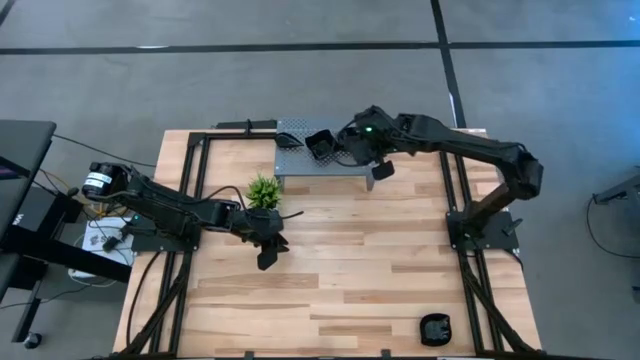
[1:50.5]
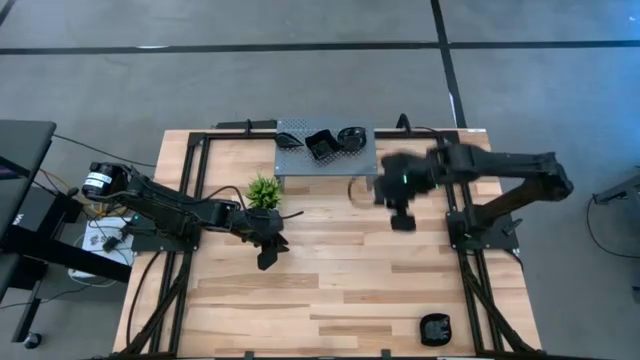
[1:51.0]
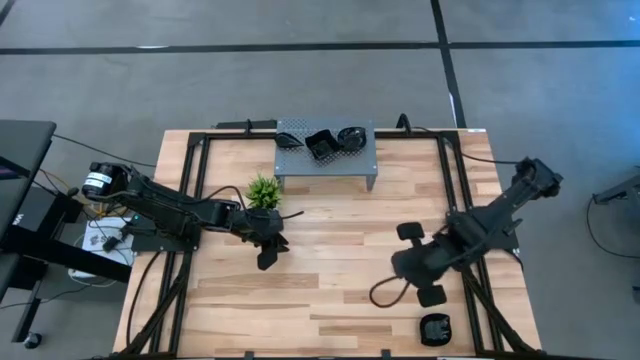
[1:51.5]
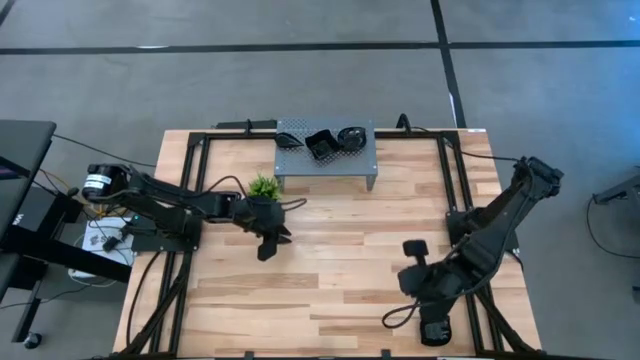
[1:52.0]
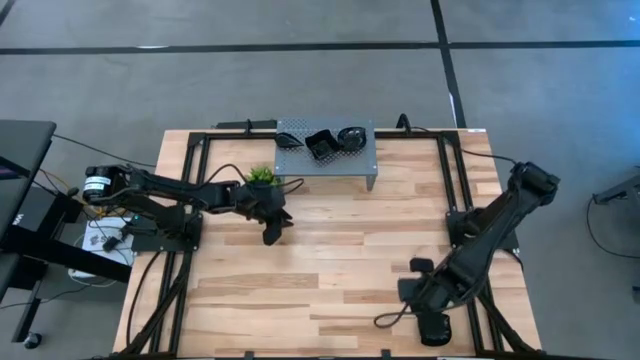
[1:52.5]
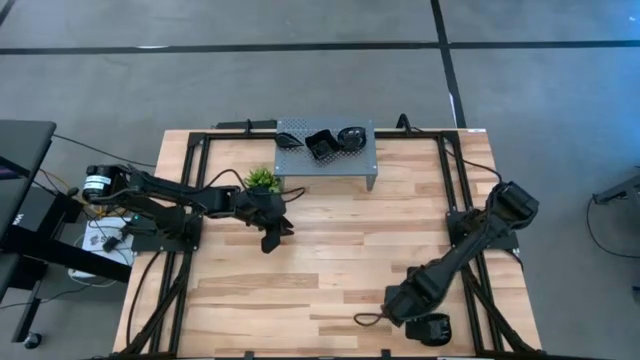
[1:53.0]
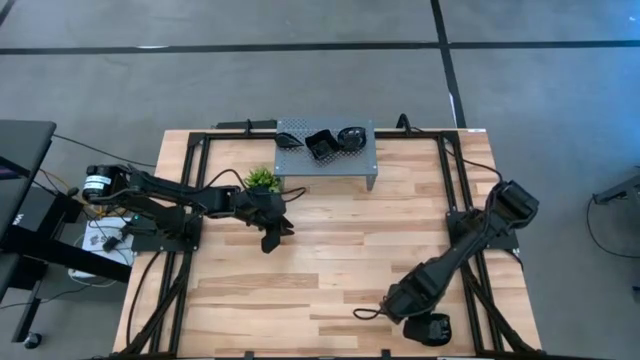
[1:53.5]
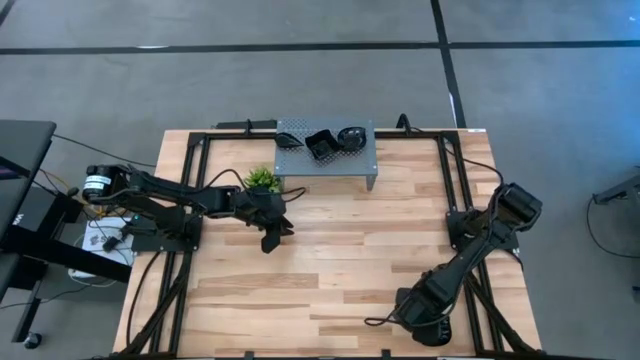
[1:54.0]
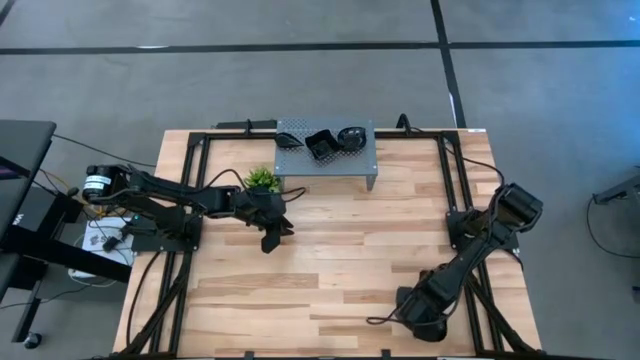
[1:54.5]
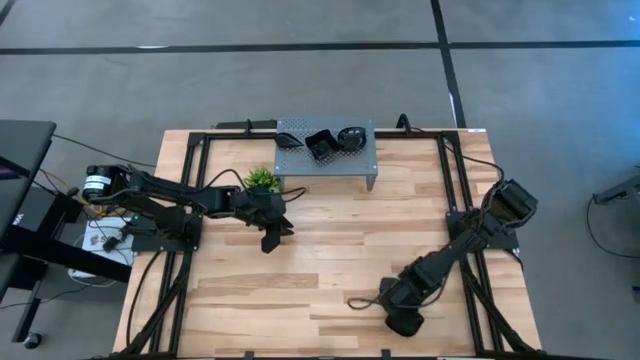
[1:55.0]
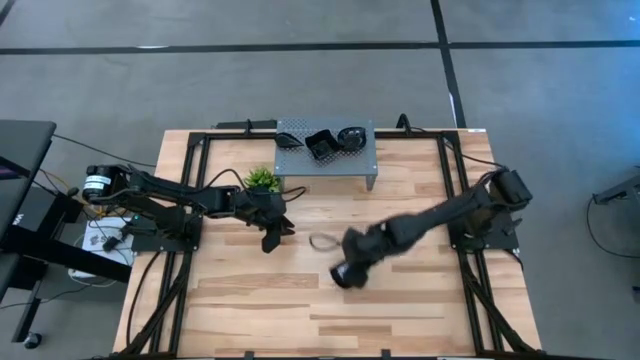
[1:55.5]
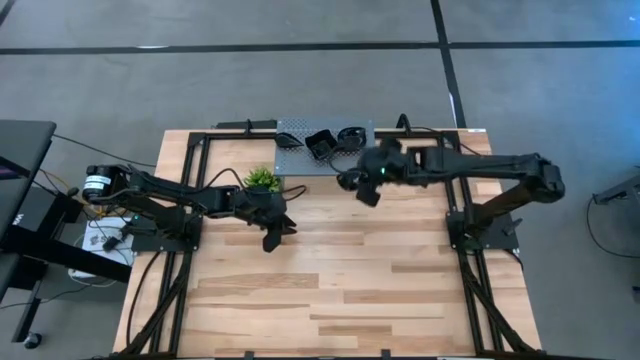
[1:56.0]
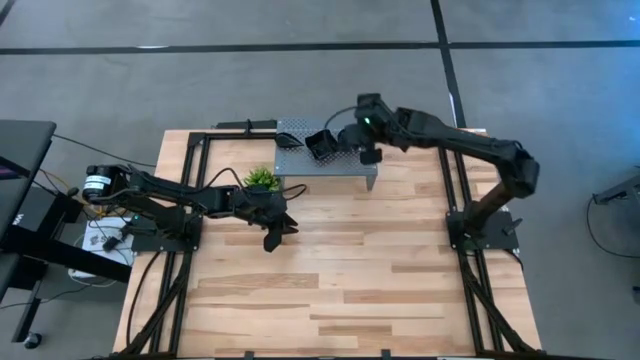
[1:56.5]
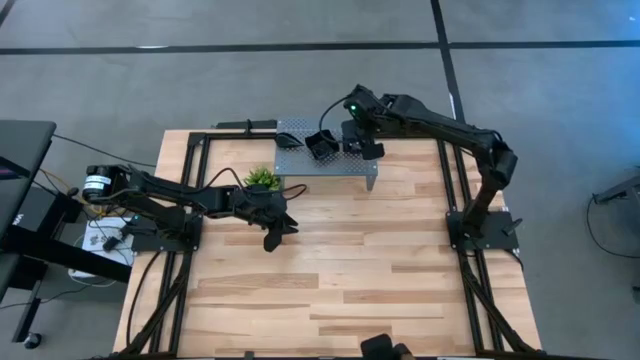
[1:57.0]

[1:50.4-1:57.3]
Task: Pick & Place Mini shaped plates
Stack the black leaf-shaped plate on top of the black leaf-shaped plate on the shelf

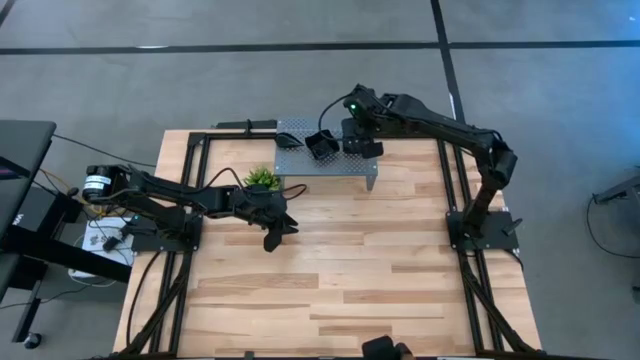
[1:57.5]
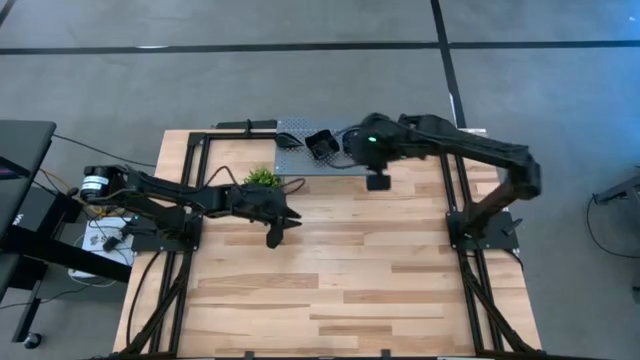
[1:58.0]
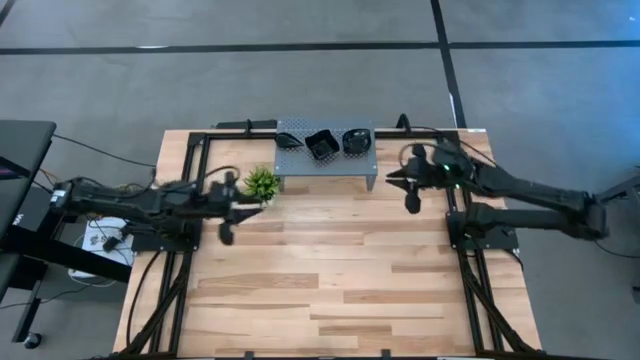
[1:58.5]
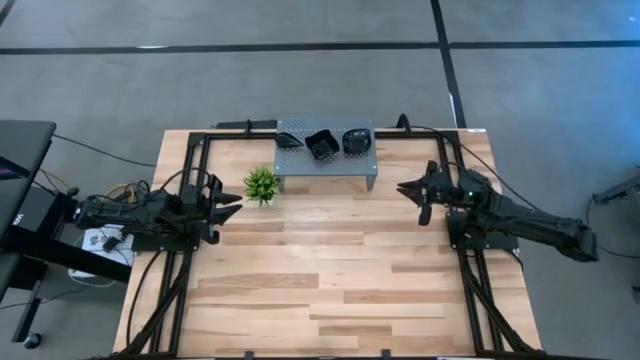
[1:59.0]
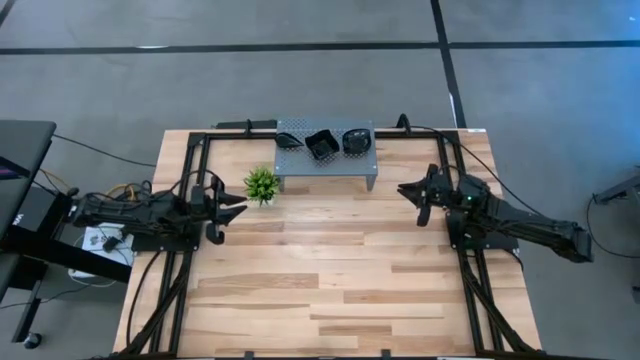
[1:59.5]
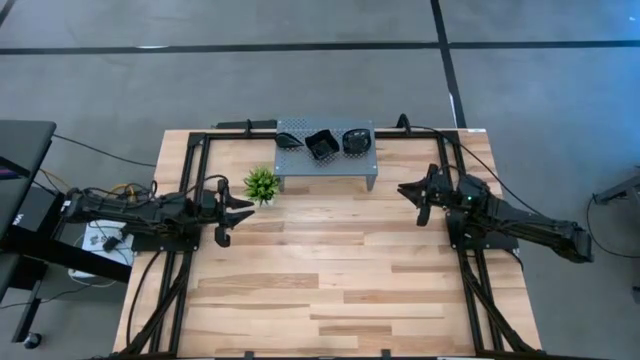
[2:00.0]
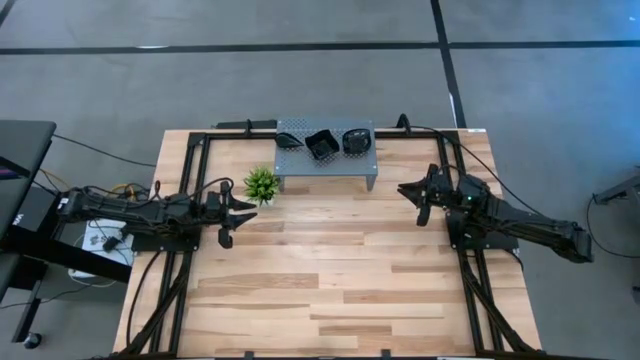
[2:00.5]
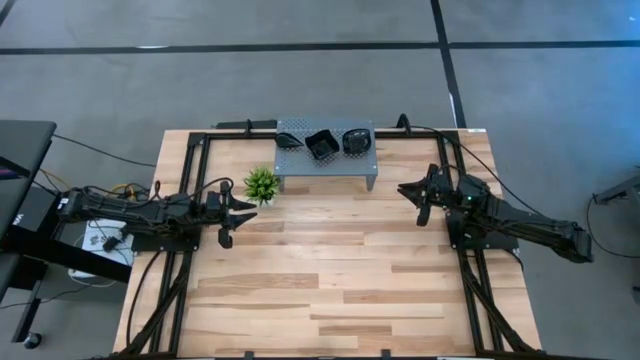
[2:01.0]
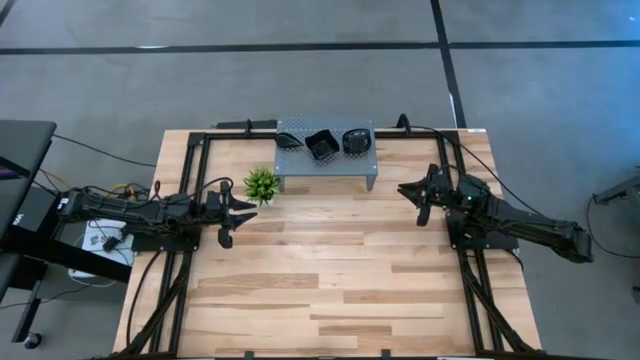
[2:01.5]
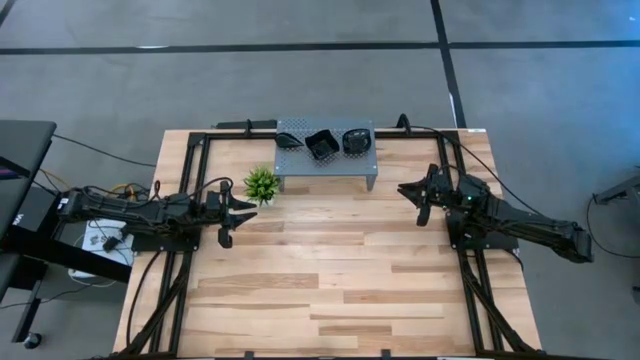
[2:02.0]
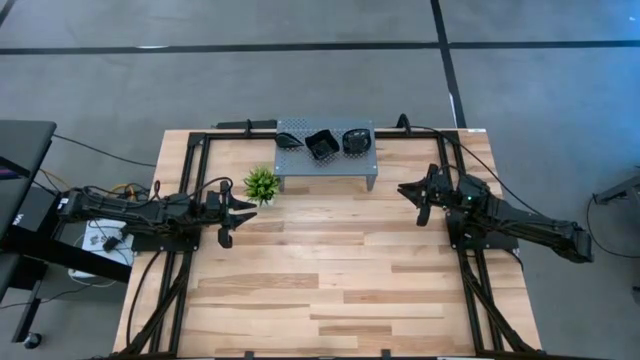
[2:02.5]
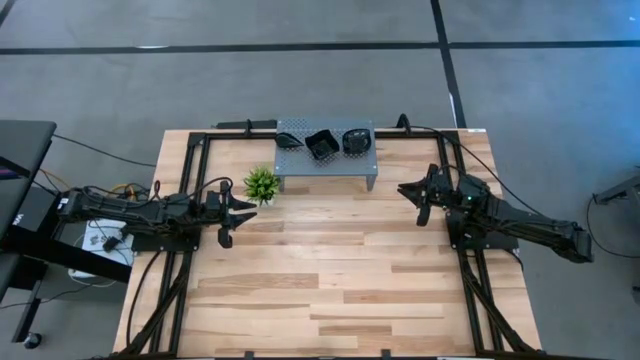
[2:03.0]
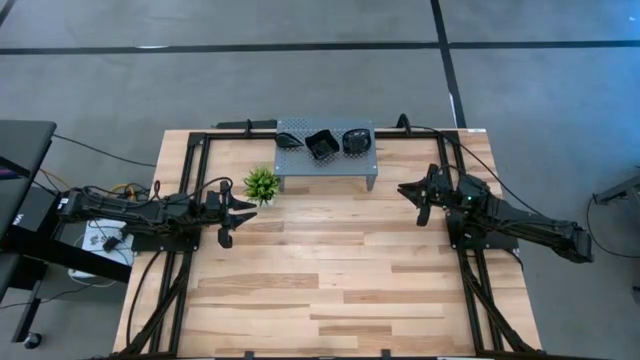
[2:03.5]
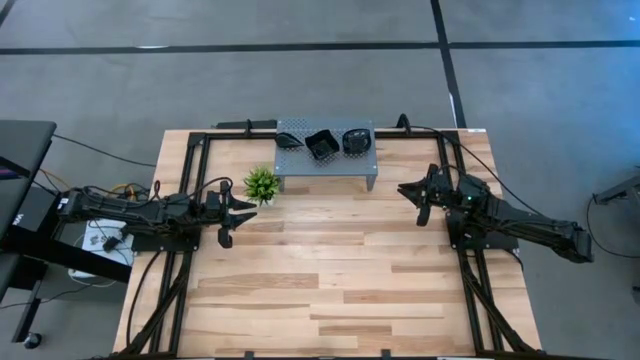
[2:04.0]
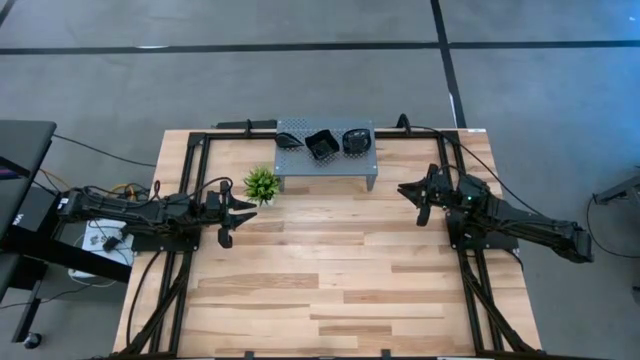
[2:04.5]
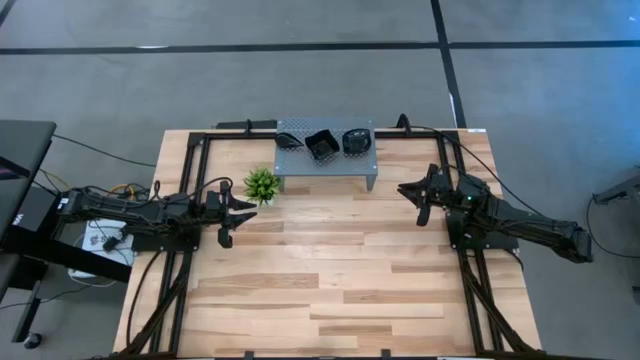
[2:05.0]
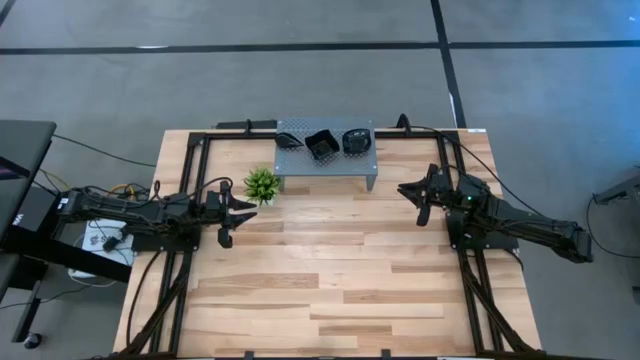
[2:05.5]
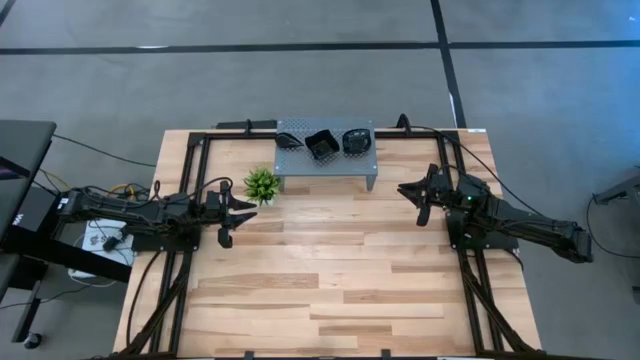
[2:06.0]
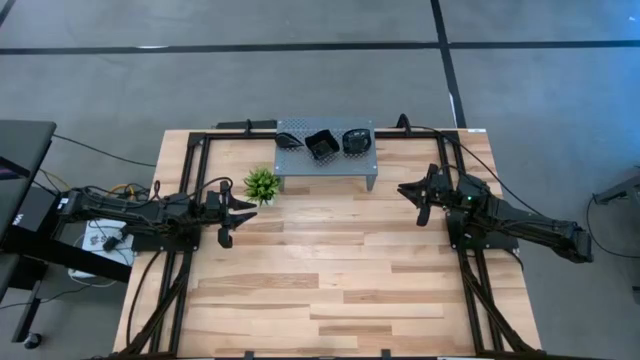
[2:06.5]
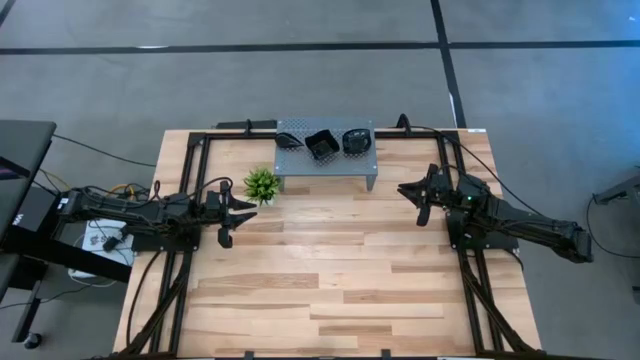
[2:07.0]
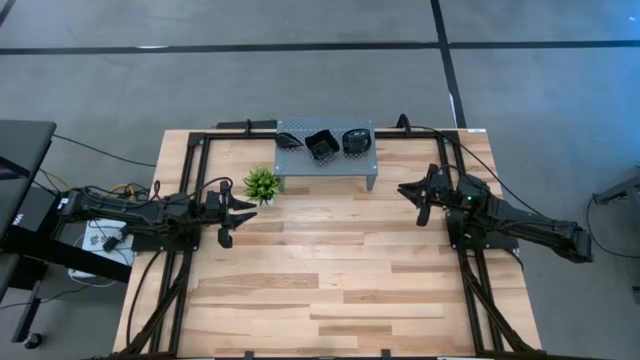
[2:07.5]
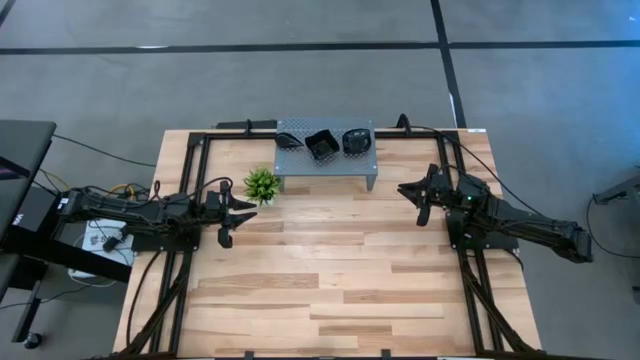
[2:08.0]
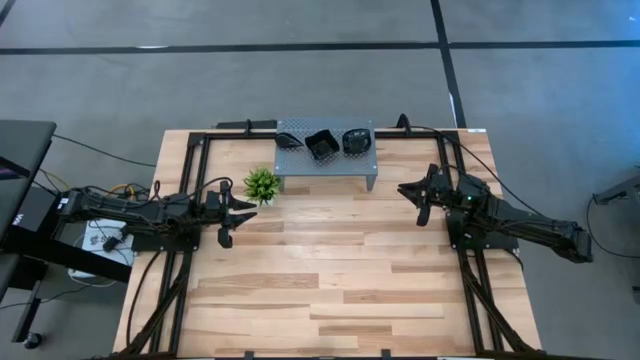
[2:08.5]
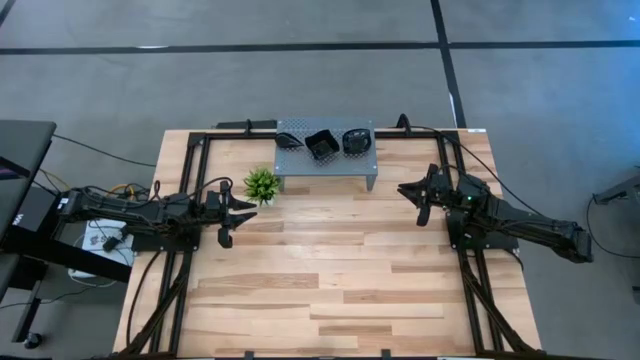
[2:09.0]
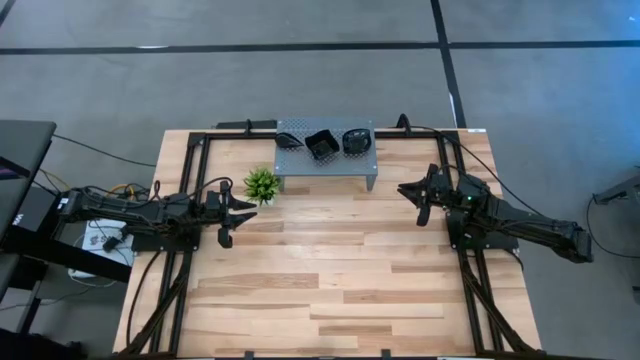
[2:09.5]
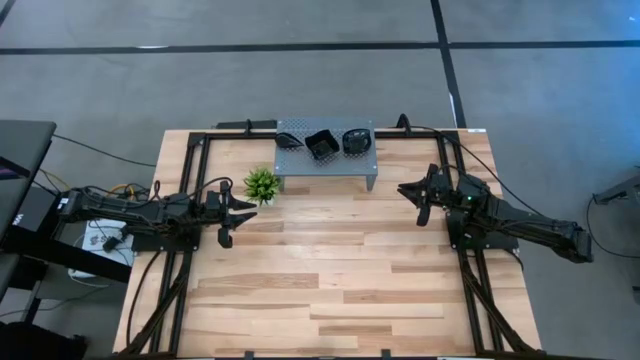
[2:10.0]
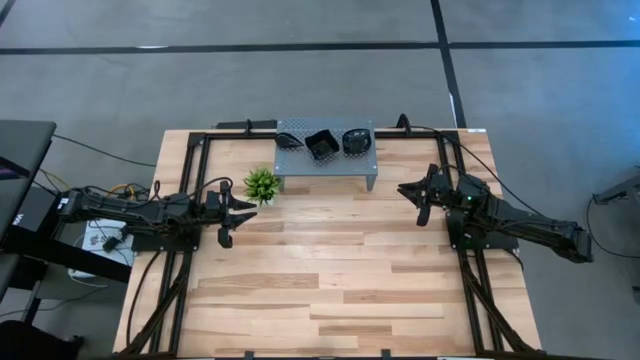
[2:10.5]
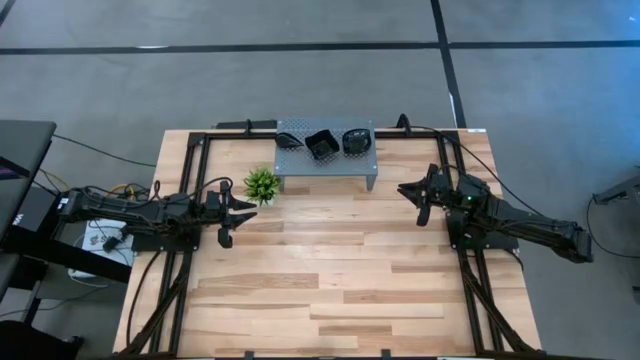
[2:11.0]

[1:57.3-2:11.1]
Return to Home Position
